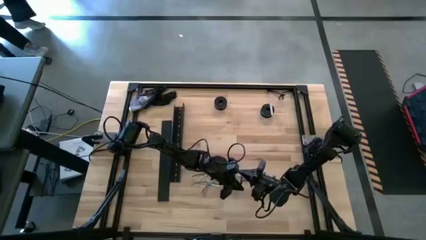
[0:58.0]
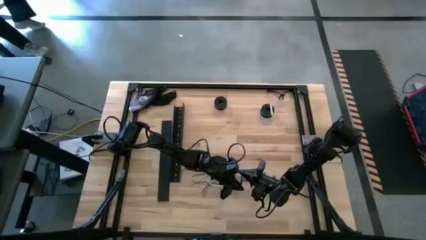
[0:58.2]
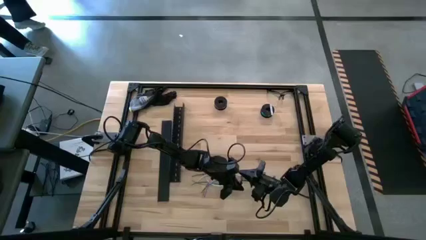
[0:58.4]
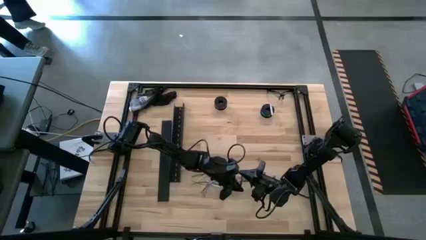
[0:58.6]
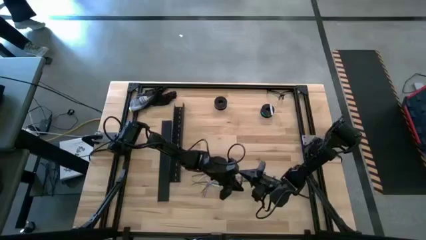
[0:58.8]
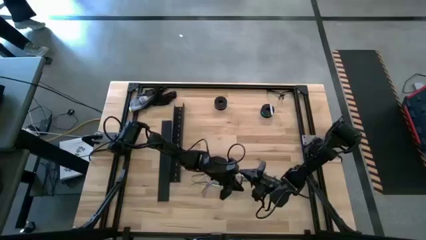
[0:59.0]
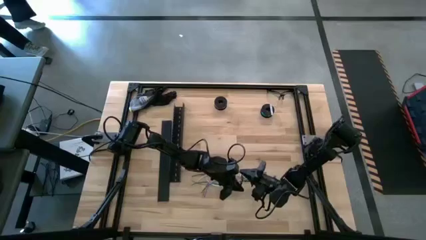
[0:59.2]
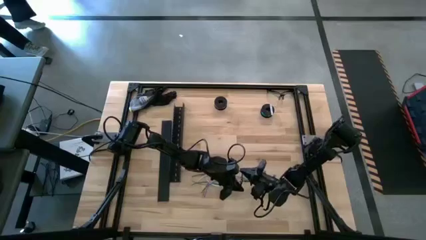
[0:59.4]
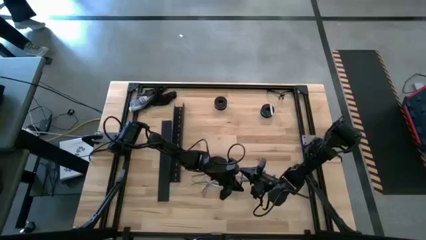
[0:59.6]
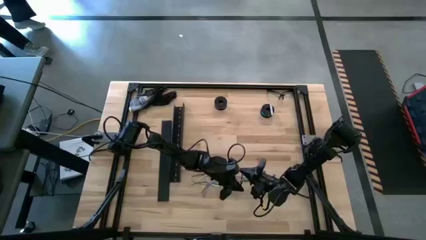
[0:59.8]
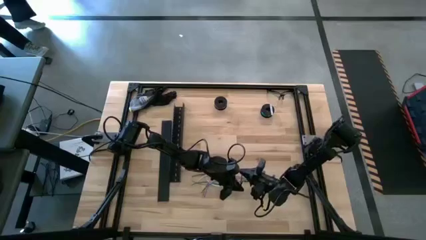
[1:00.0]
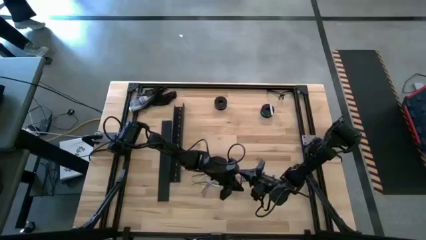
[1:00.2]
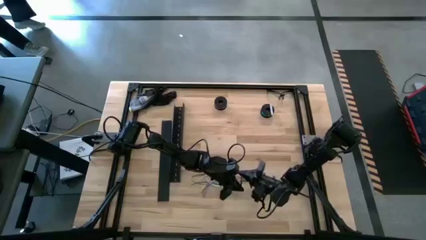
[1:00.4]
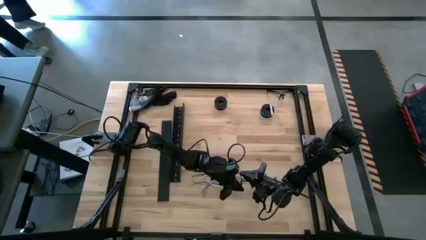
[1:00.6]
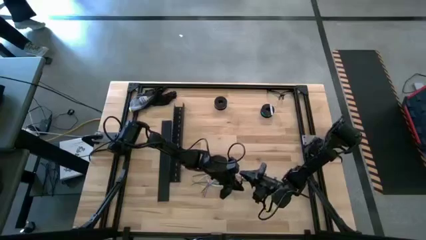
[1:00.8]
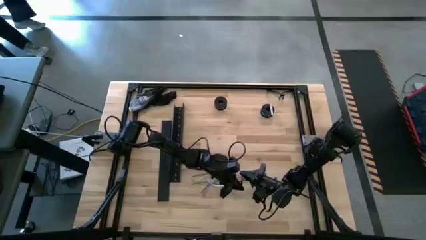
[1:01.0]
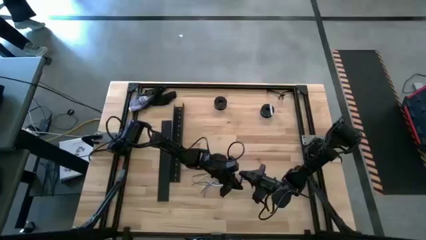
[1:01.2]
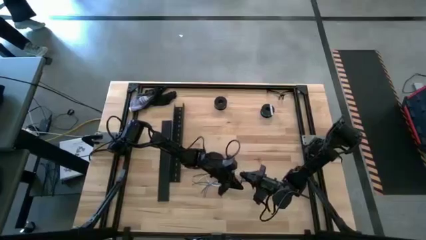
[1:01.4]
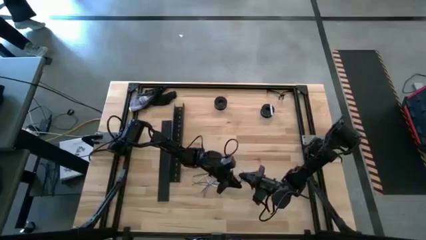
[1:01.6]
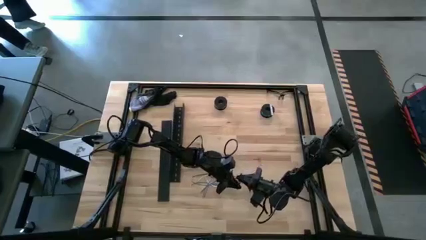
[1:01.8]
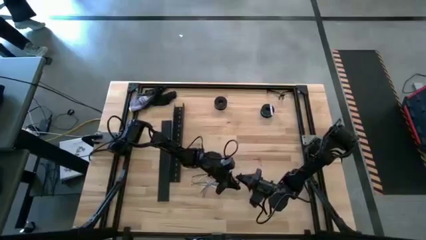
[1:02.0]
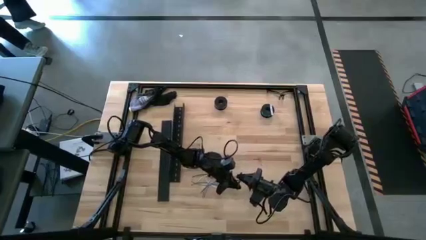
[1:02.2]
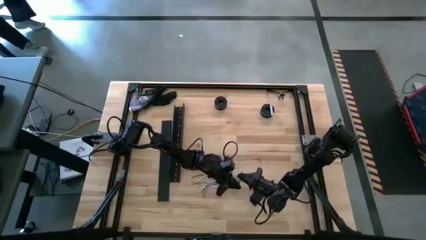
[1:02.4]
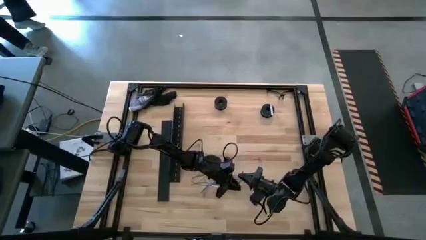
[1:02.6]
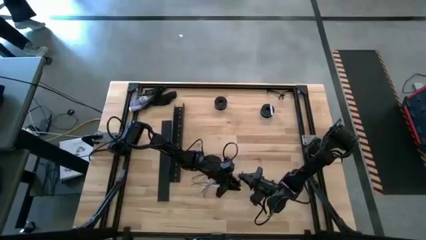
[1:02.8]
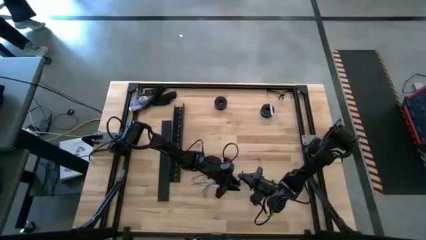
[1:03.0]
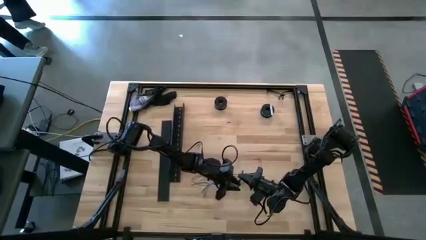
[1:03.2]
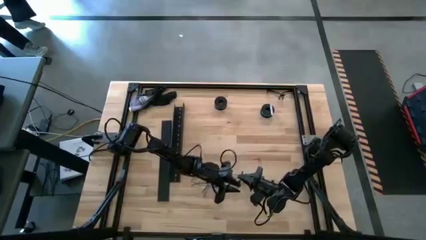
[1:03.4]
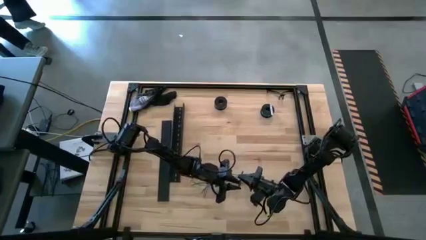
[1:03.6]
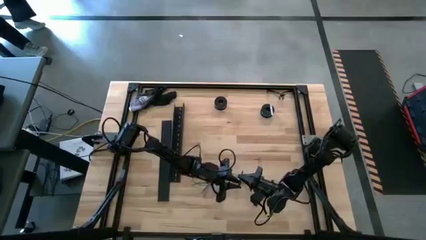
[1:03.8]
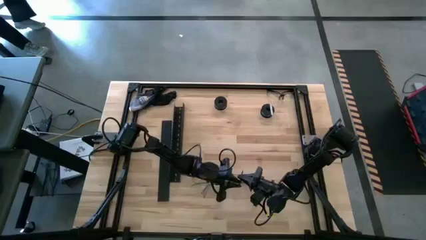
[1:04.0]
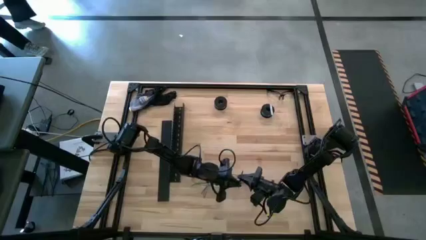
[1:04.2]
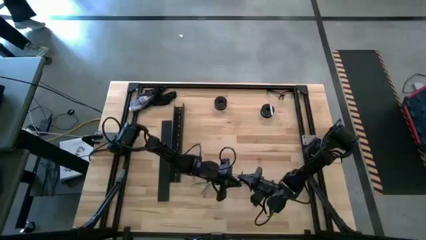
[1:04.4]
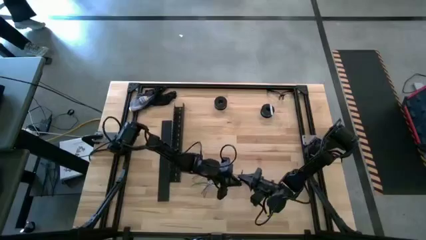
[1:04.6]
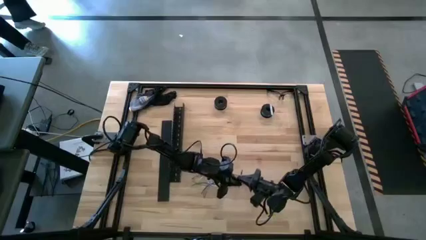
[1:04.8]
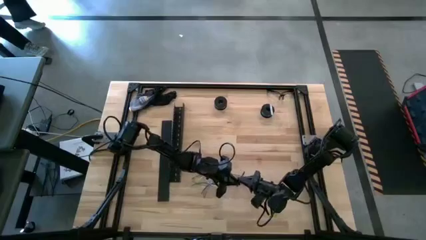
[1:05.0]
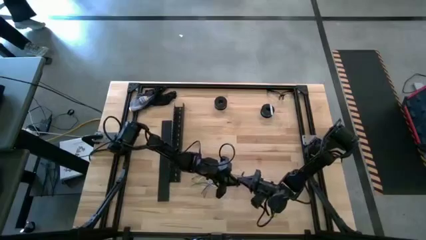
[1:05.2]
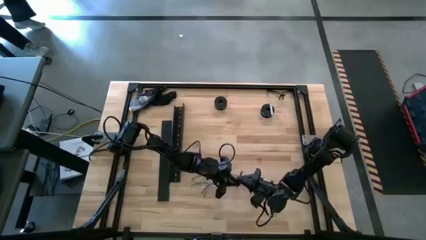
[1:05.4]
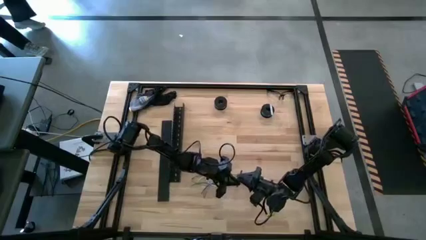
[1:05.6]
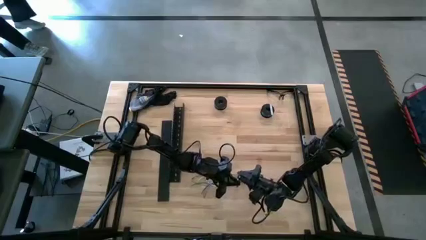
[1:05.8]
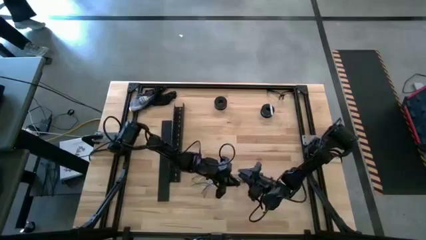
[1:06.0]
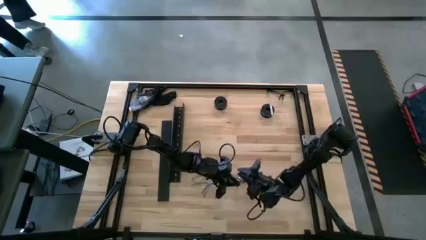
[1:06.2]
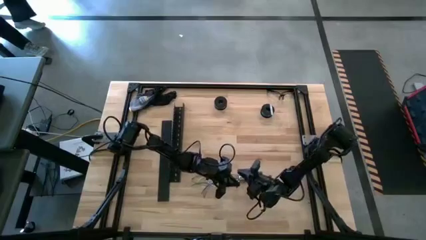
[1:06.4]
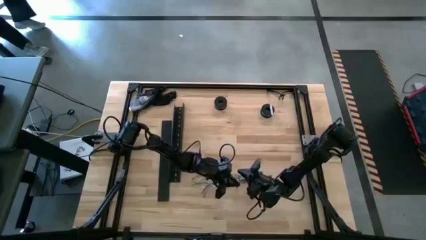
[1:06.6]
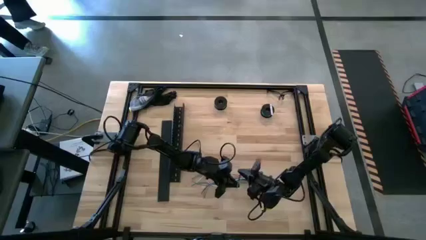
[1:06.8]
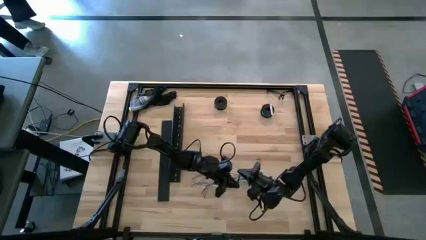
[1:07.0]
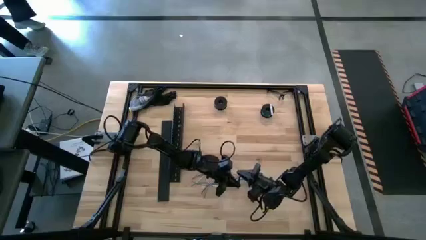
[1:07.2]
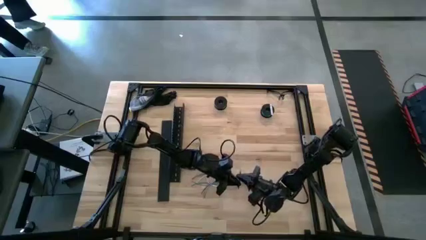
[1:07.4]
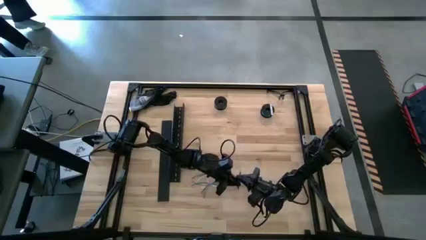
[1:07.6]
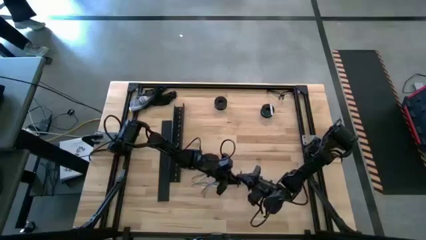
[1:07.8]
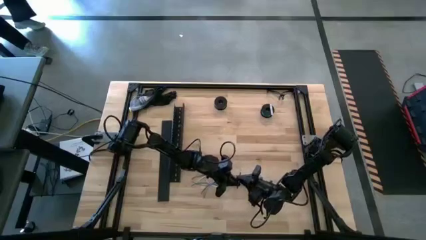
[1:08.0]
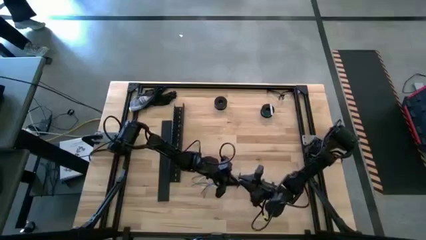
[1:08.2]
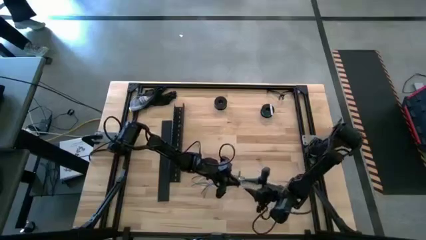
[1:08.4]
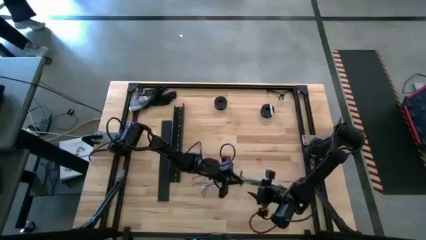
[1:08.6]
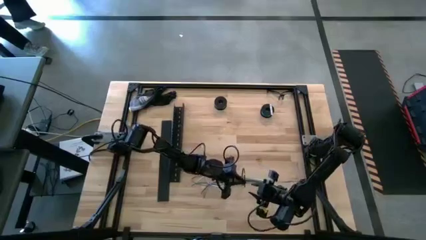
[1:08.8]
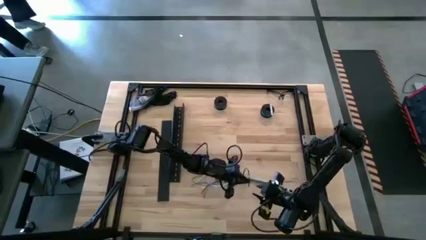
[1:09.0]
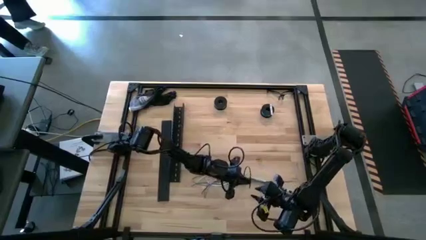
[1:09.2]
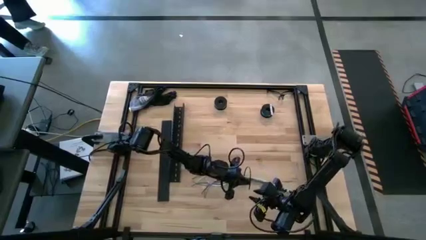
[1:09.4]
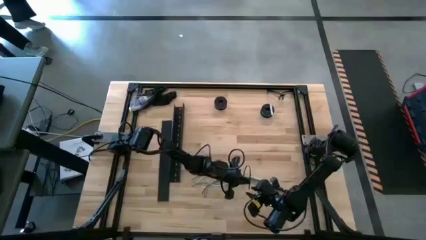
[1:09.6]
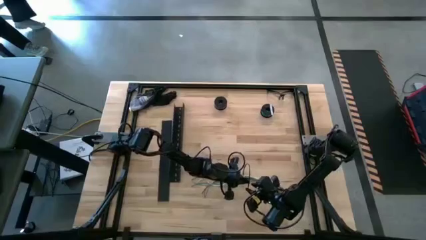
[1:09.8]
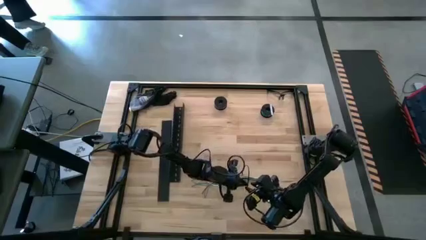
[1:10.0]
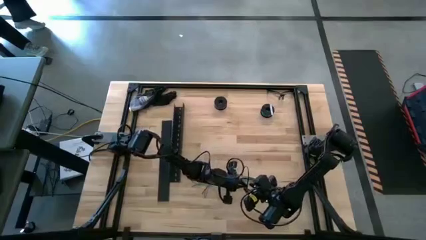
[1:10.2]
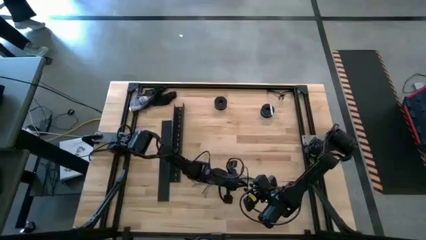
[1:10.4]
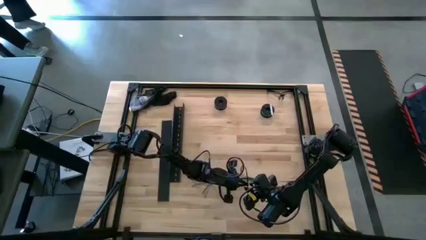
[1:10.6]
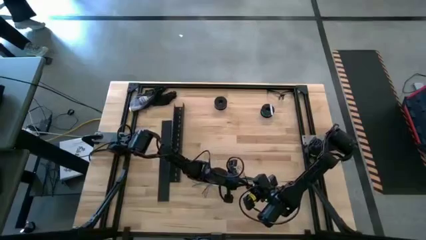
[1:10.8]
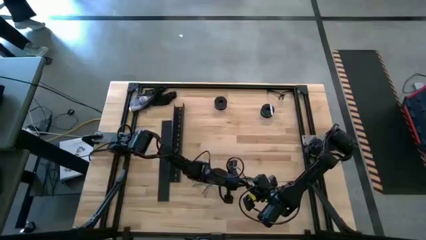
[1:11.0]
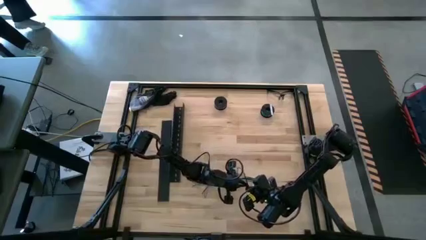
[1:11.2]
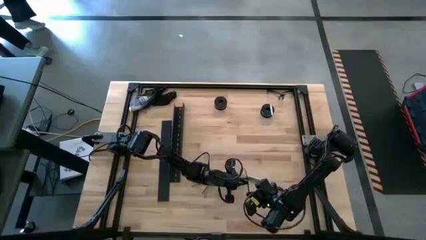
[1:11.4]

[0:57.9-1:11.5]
Task: Ziptie cables
Wrap the black zip tie on the cable
